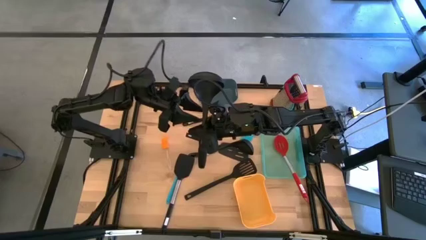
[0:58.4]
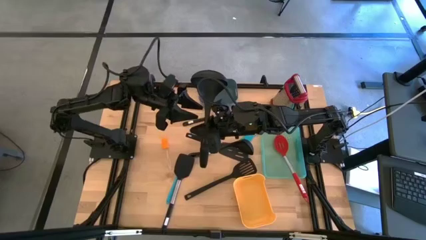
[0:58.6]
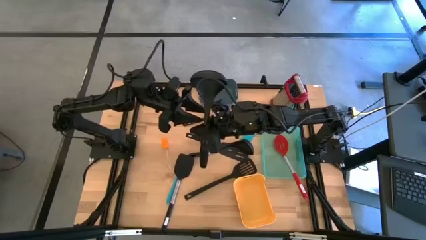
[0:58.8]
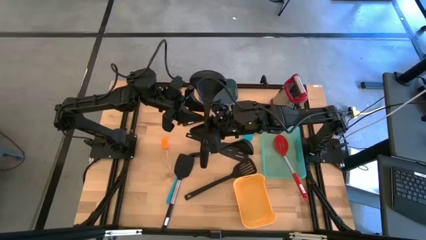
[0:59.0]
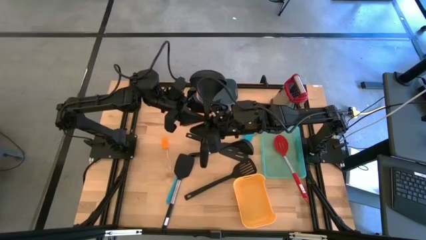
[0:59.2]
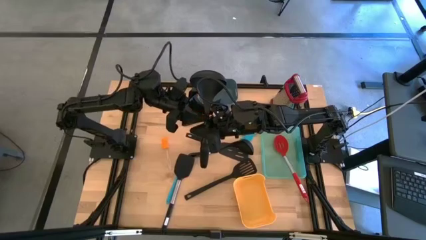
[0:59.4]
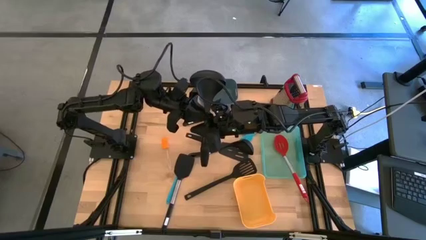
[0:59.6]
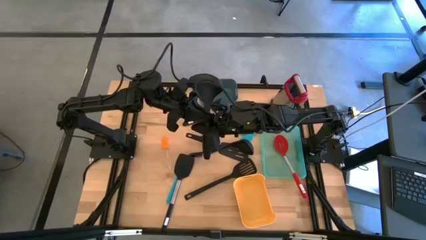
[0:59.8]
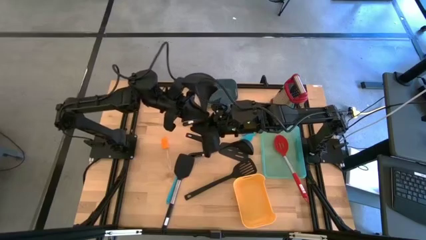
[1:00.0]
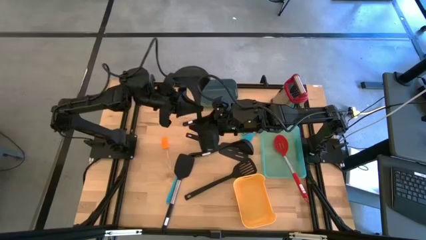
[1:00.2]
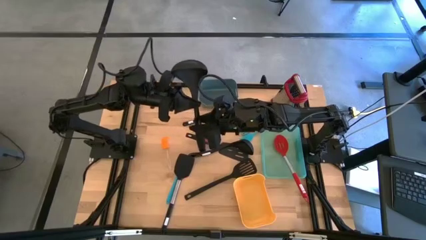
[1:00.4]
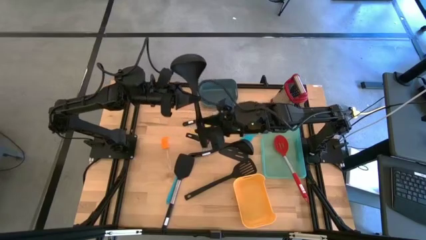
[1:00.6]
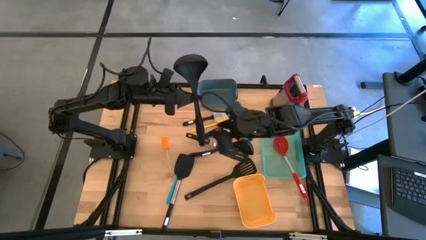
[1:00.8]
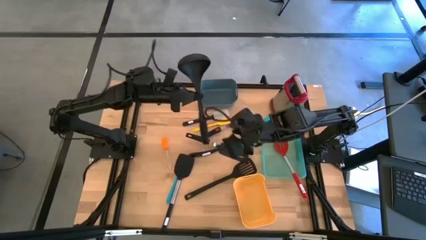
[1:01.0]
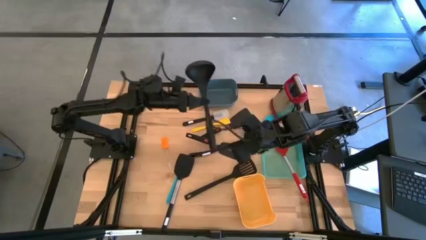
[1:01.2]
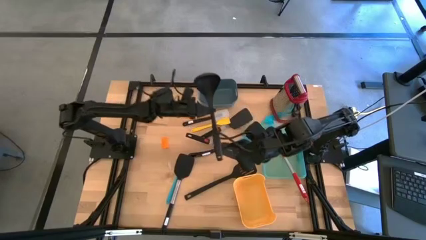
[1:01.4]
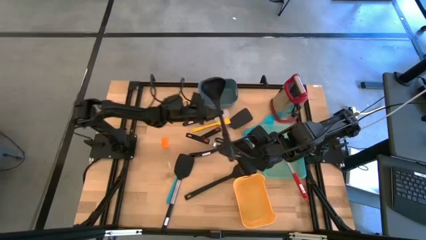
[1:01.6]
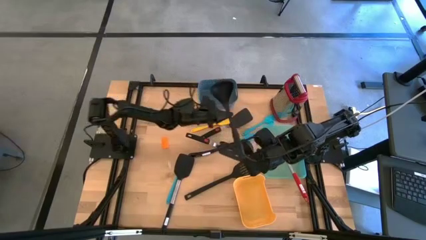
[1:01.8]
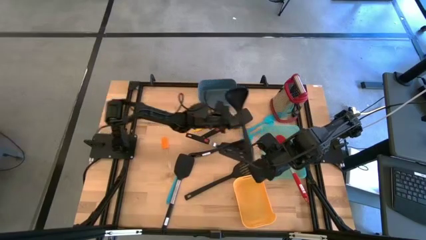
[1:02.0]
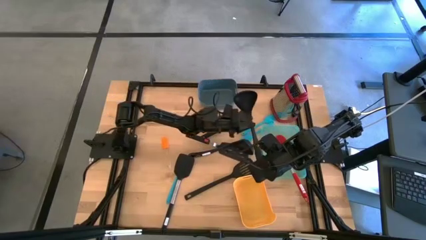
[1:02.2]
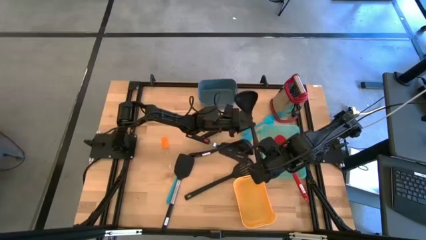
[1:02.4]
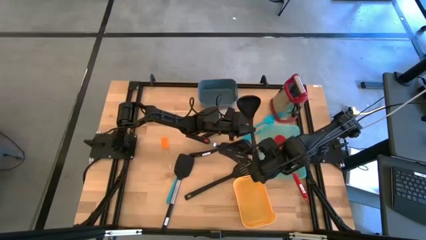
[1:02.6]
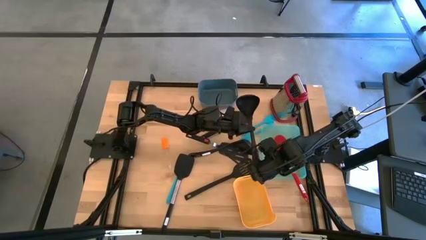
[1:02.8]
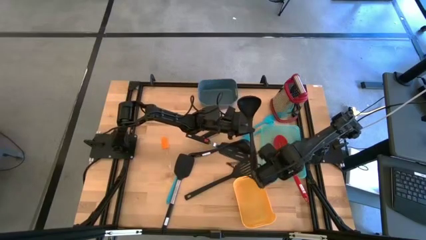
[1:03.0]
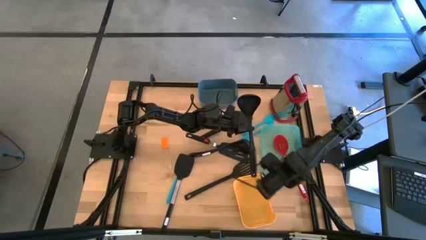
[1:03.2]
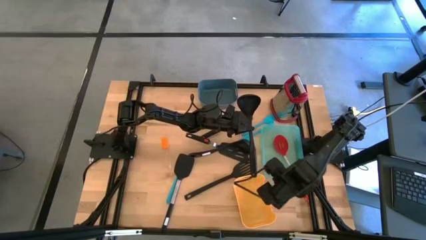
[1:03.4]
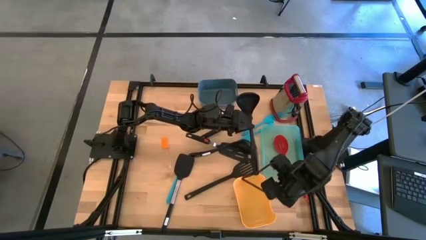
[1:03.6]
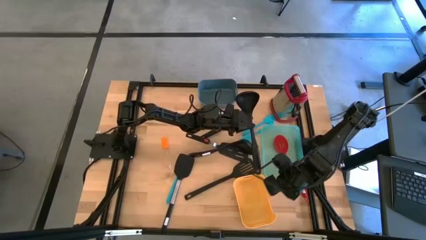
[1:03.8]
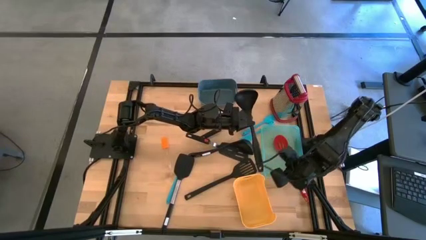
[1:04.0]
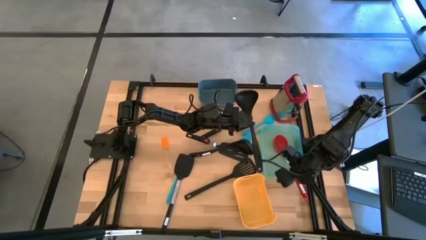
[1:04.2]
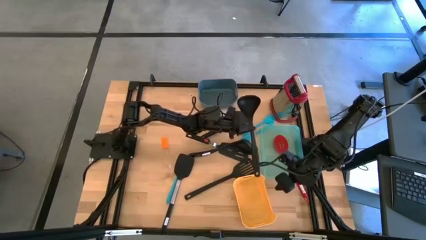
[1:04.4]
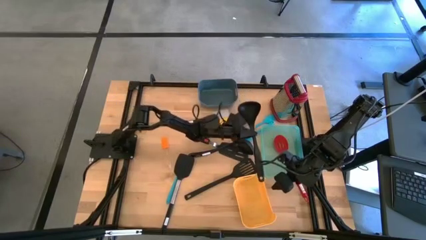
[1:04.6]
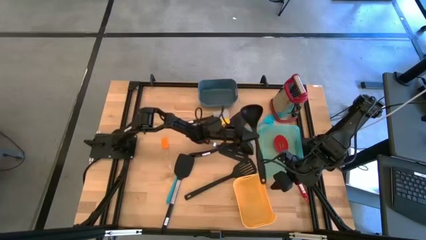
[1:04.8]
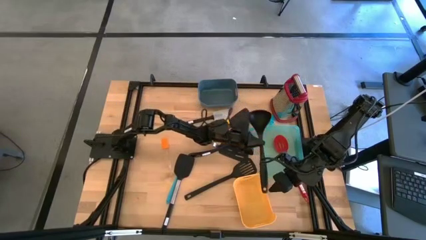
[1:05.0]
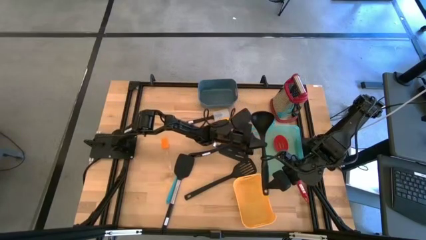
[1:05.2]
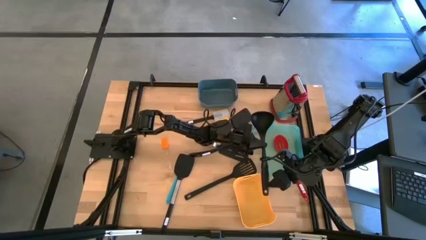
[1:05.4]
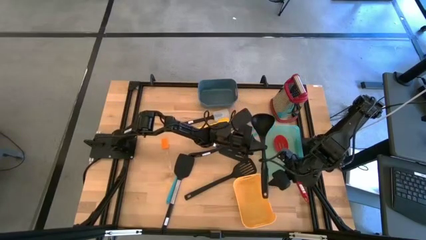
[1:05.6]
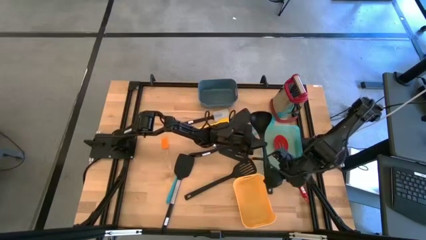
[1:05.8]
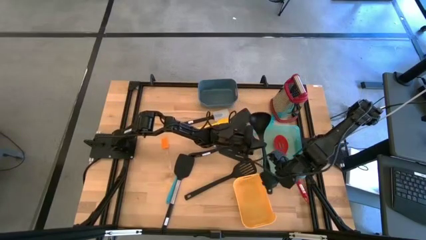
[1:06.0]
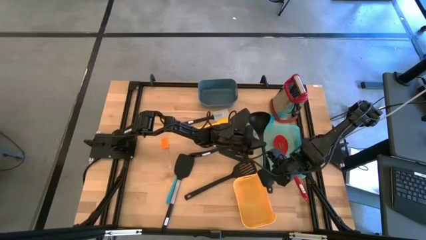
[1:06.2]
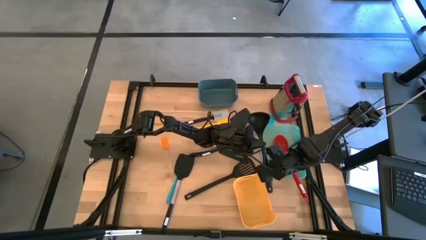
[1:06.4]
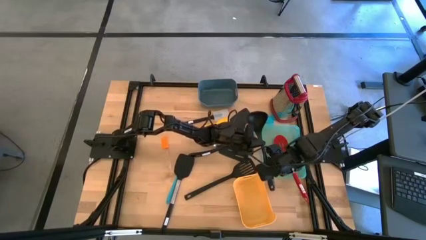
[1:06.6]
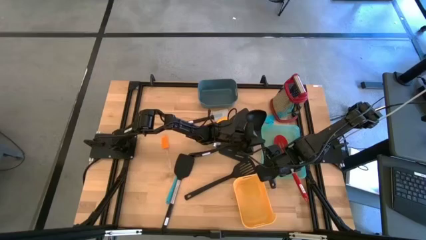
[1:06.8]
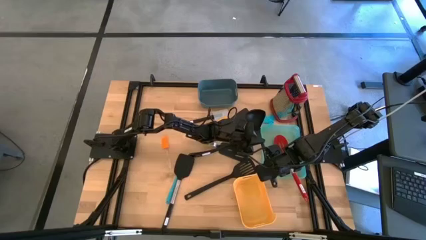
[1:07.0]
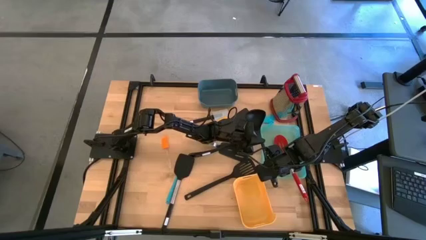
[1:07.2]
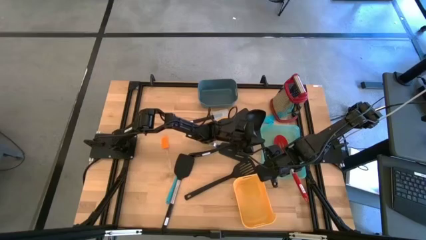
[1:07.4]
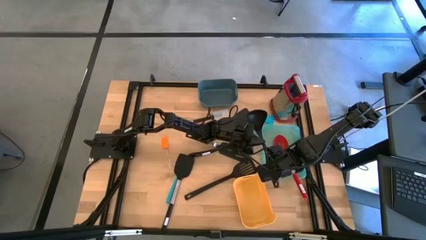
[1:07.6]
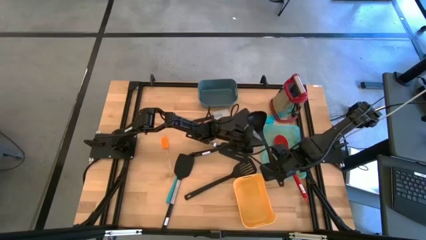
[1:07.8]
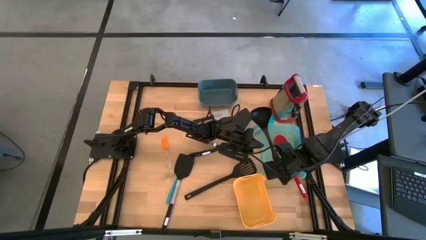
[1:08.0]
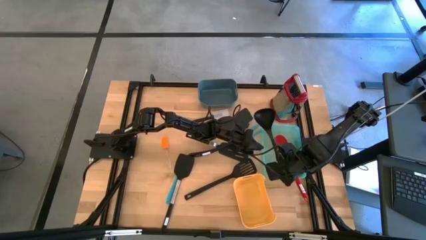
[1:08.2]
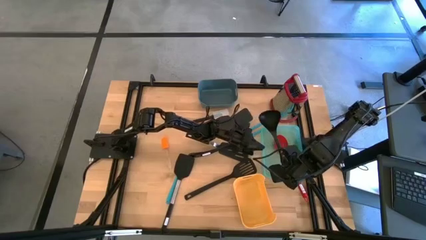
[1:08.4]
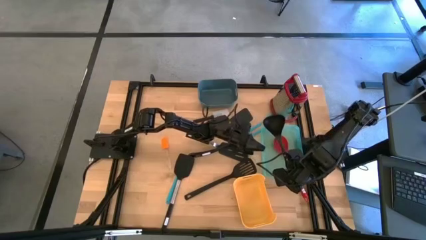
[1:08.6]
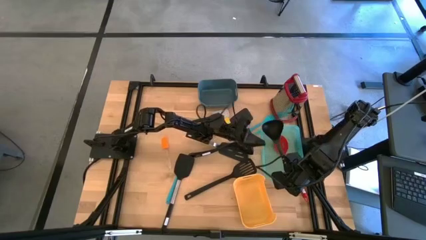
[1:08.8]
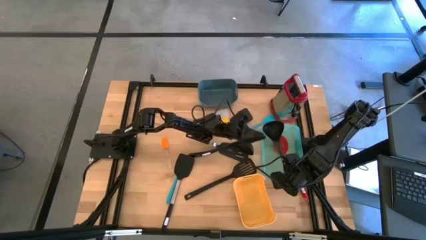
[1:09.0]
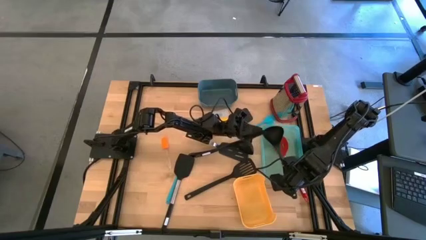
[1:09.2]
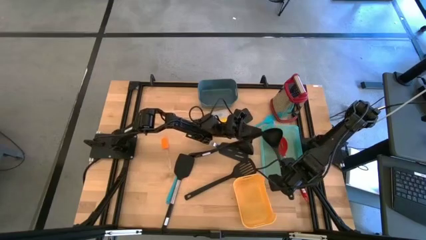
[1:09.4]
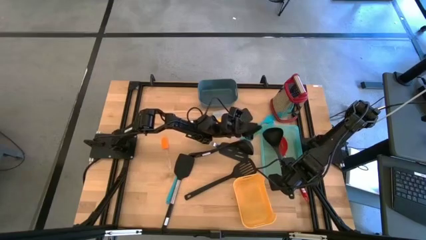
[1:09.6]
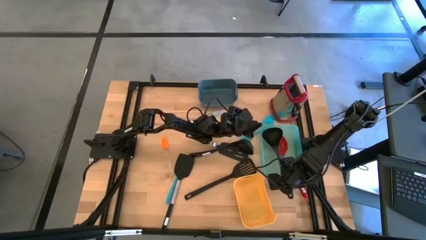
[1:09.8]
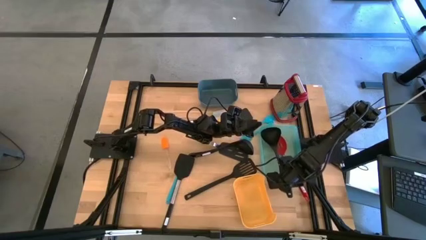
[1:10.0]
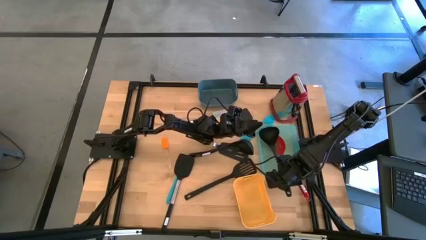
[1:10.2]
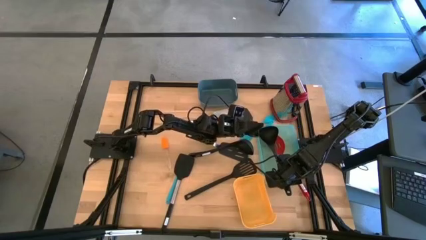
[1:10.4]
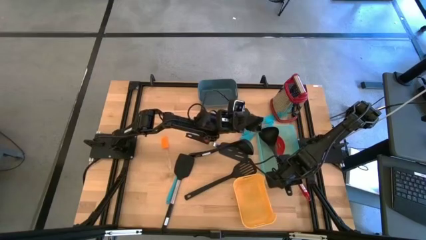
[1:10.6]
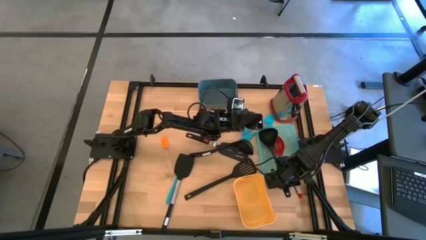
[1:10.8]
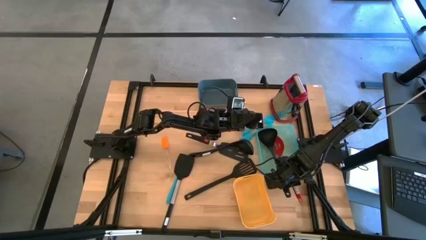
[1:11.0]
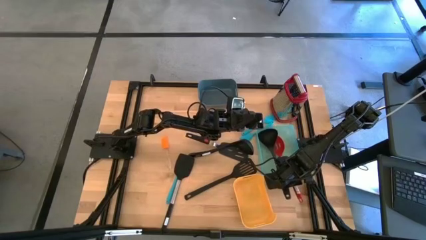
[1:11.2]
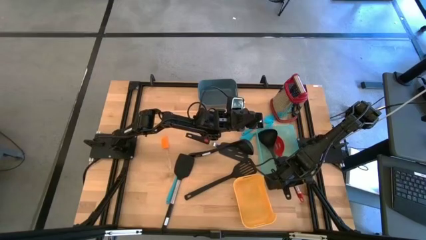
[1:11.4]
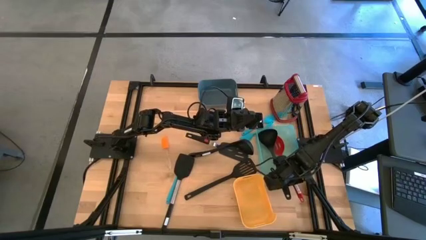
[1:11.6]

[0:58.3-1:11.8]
Task: Pick & Place Kitchen Items
Put the black serving spoon into the green bin
